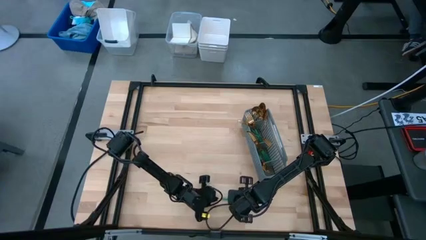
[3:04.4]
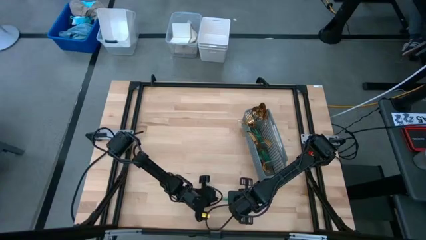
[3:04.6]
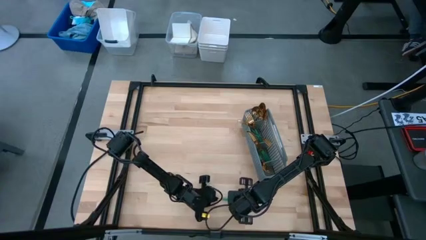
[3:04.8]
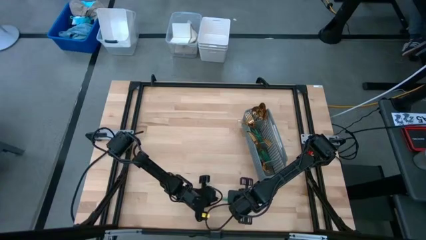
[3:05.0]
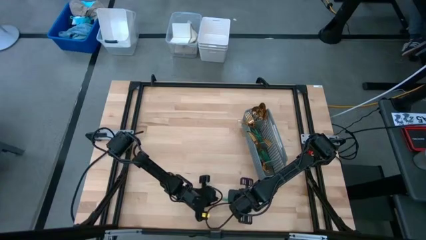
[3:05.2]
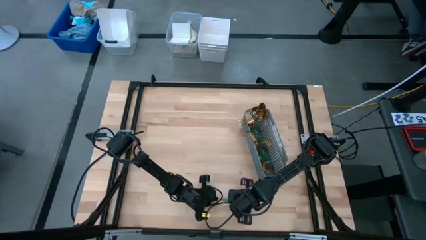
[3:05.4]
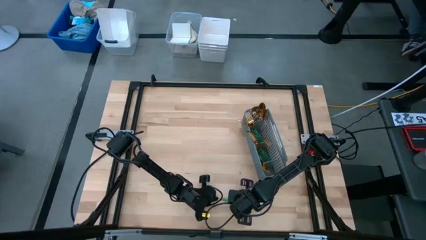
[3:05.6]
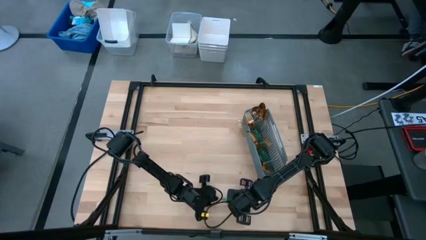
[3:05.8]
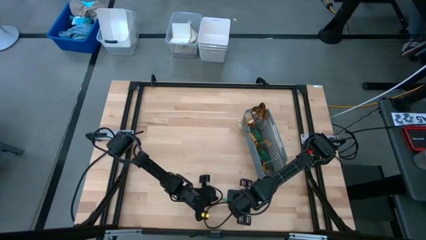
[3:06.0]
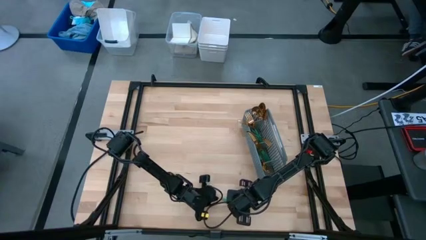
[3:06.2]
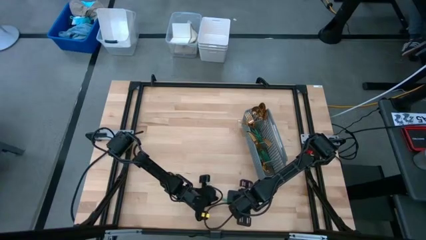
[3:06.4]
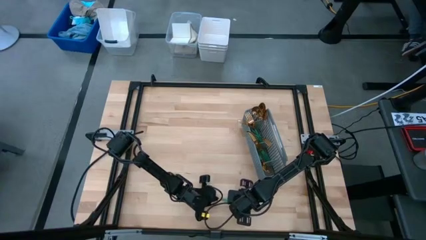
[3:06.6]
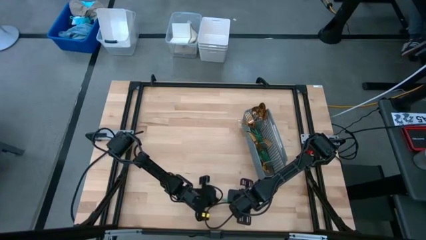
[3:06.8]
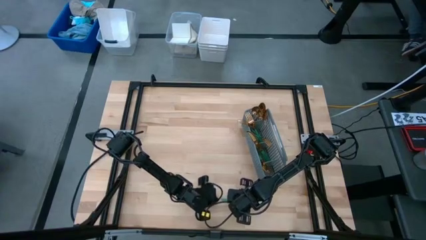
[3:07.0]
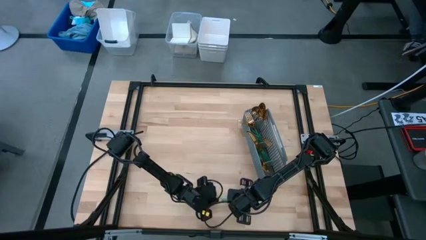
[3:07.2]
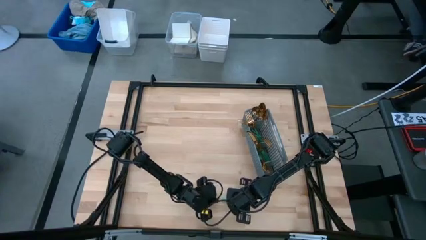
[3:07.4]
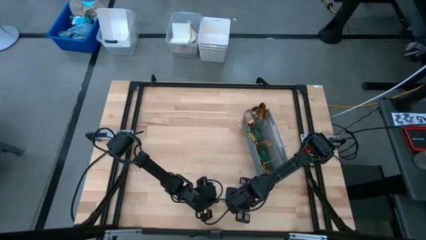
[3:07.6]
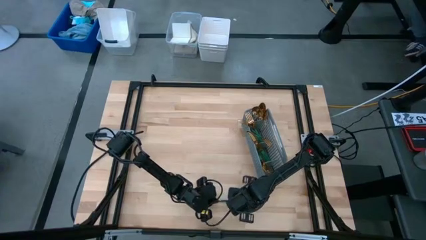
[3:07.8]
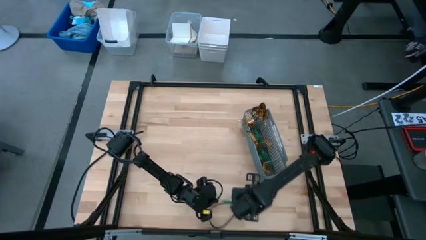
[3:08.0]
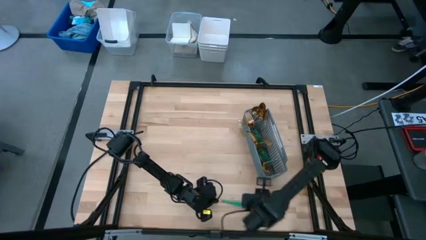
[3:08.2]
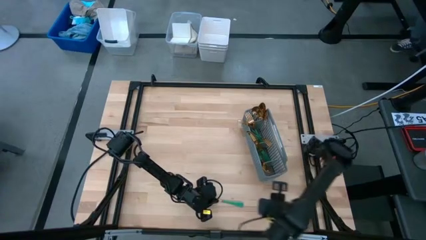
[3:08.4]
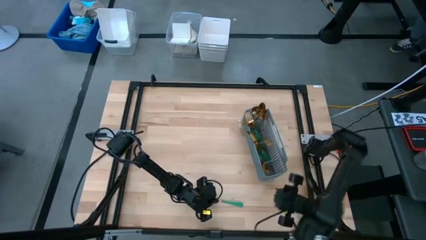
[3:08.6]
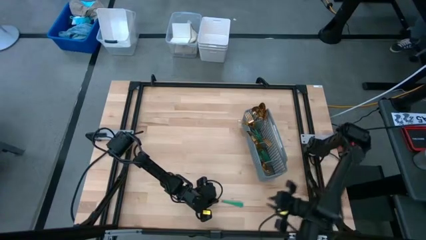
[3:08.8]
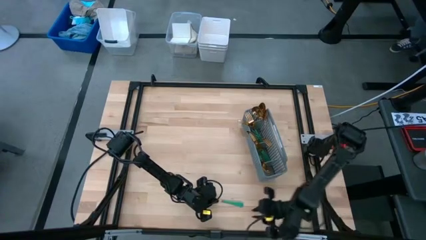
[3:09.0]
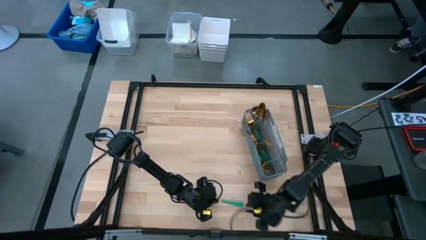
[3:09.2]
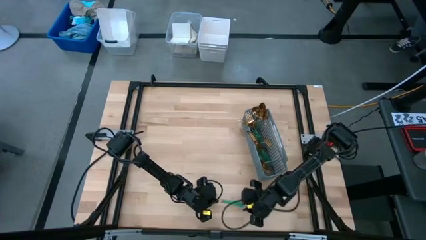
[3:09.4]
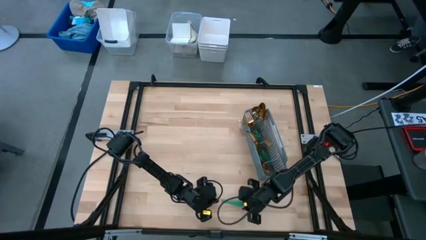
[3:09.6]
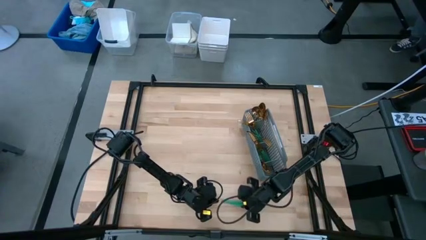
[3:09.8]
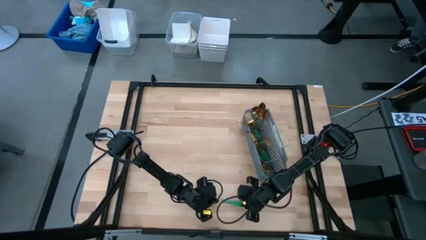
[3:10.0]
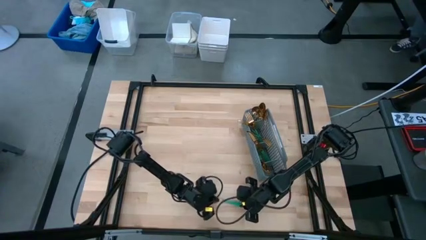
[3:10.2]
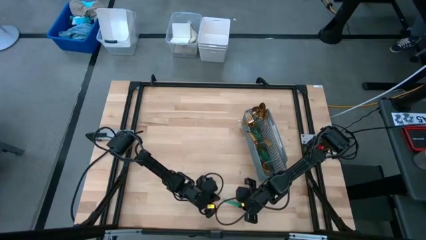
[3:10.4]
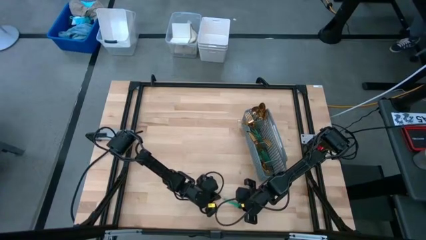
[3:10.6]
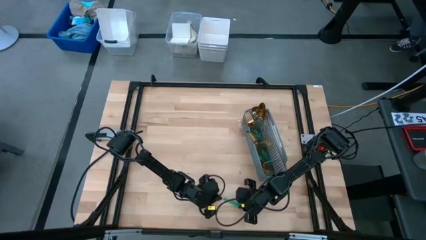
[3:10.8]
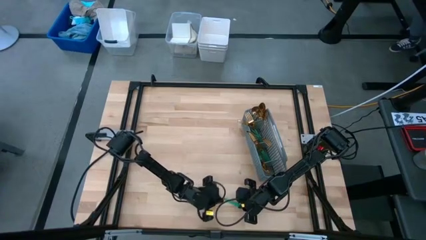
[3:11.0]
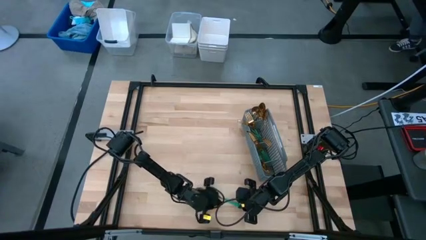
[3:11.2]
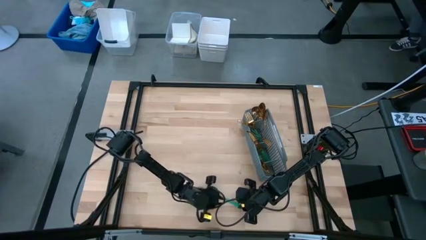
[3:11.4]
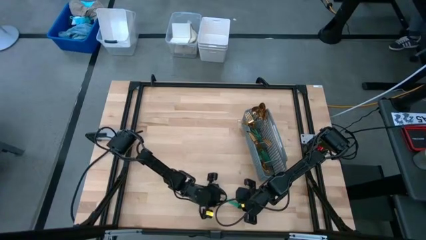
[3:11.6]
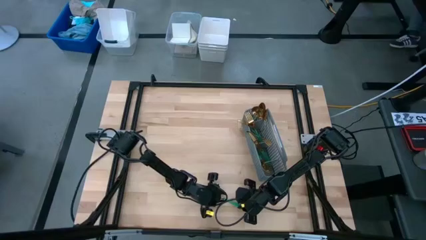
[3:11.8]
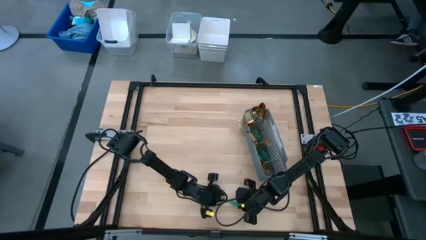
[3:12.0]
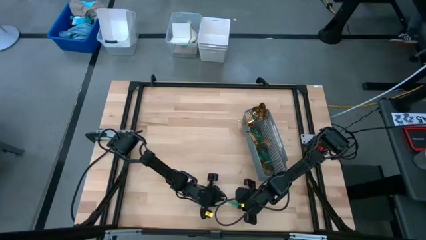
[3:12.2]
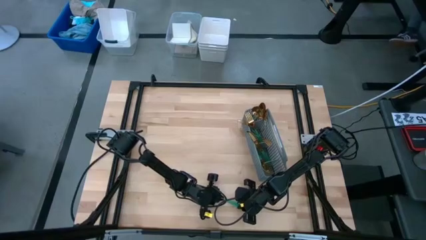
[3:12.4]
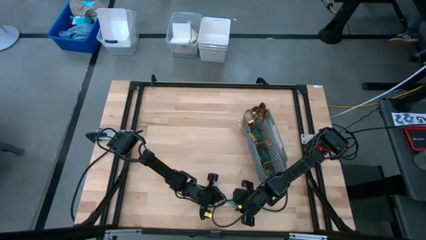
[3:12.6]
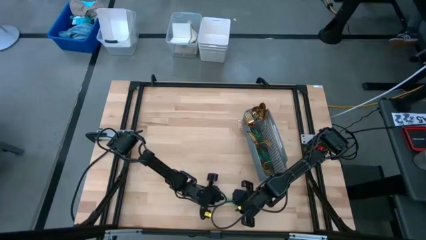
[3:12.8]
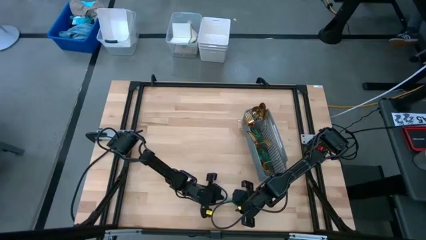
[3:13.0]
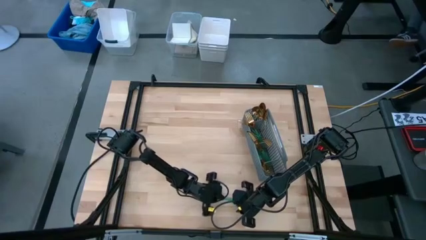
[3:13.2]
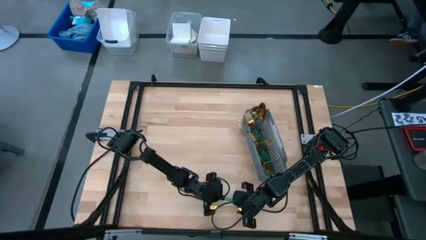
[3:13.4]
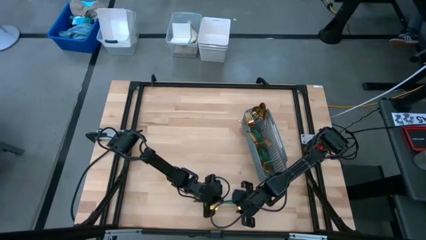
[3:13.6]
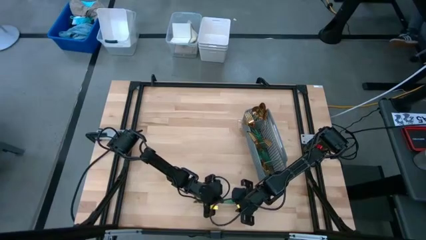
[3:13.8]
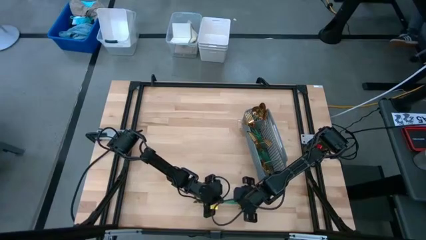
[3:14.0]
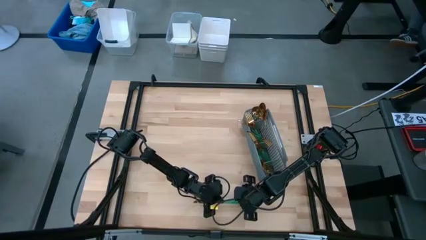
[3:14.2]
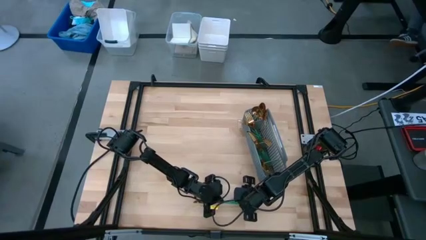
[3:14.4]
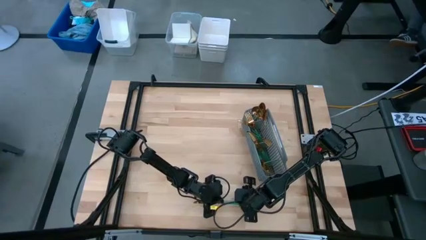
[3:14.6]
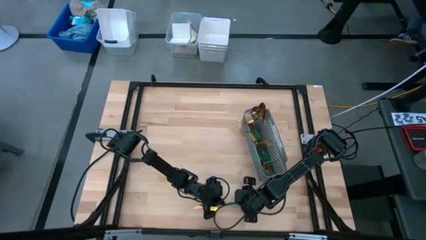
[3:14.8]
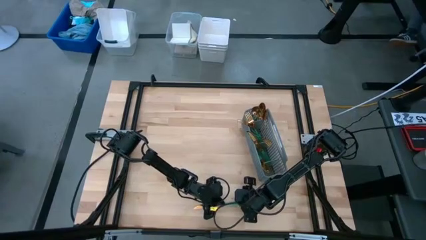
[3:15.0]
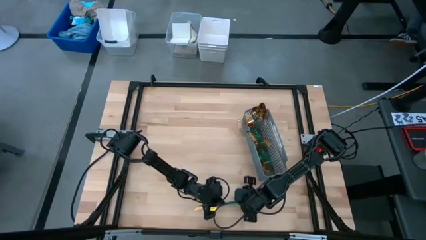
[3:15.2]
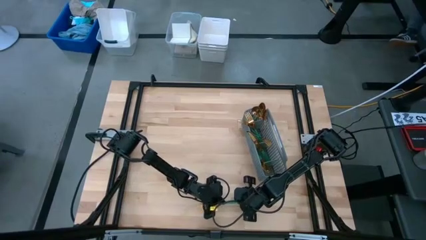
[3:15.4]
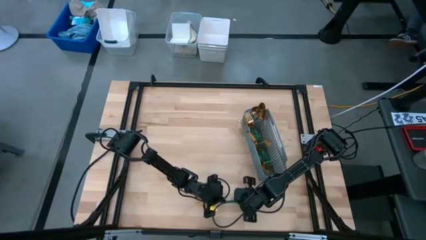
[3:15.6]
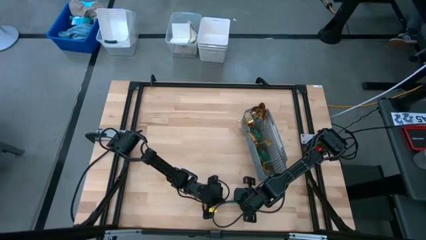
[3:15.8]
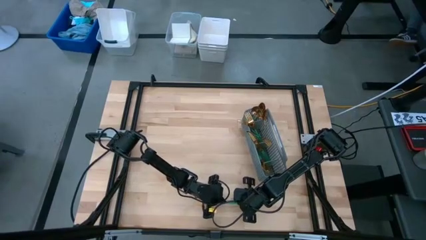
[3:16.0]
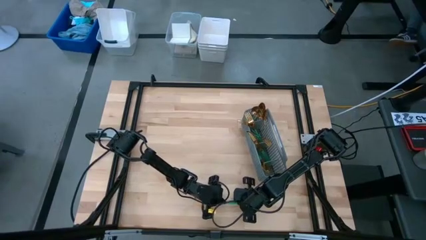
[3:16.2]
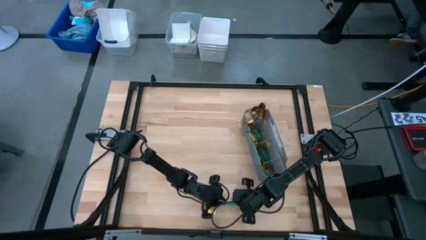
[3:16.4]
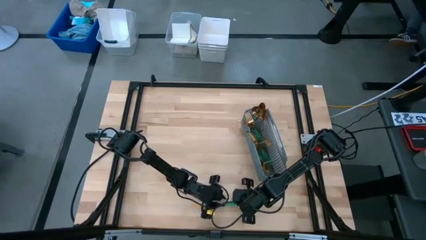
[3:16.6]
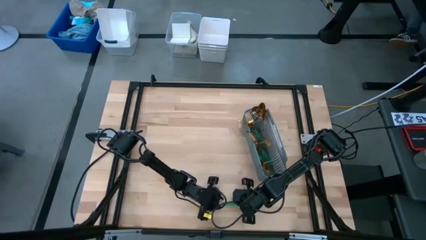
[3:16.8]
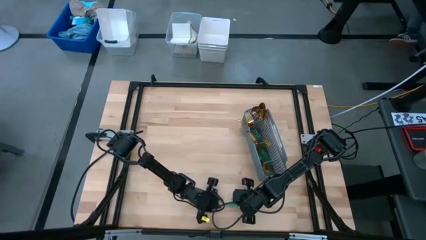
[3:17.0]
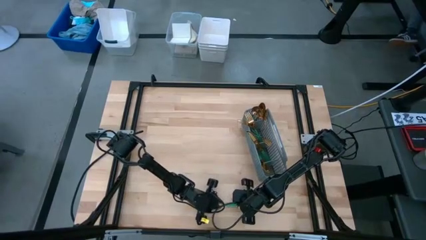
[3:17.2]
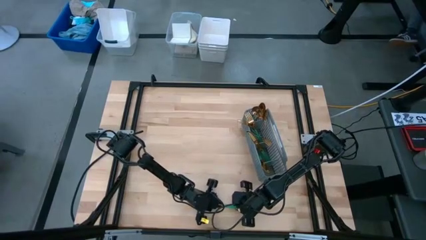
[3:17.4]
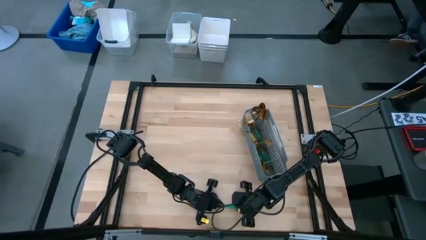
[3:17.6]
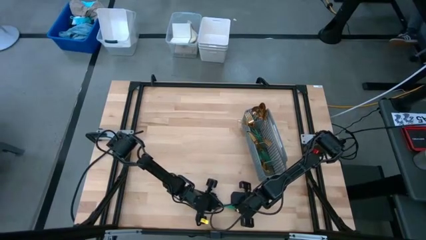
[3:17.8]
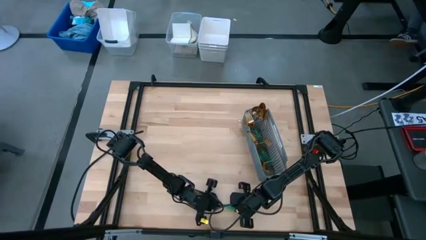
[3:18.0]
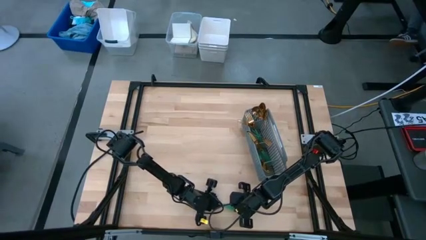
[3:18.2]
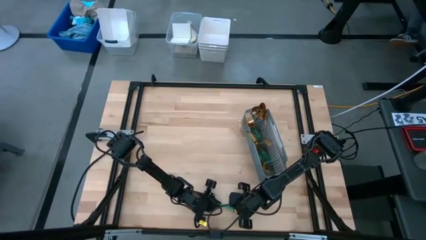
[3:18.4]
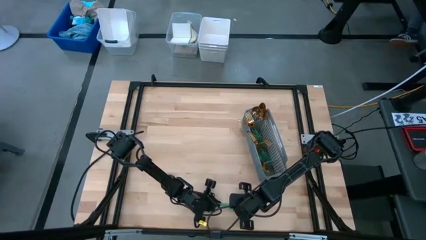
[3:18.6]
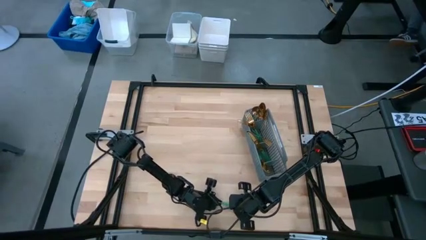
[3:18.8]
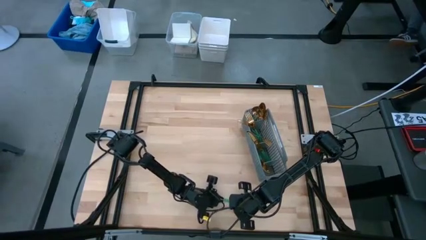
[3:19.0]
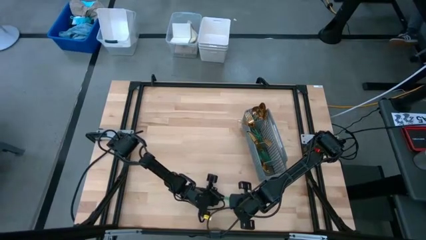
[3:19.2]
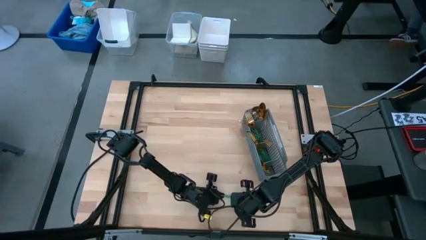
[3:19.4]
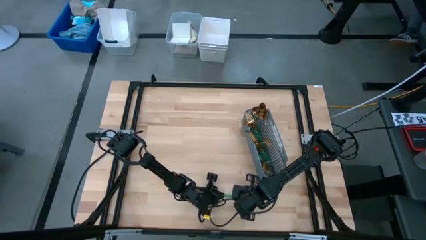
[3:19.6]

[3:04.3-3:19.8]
Task: Sort silverware
Put the knife into the bottom section of the basket
